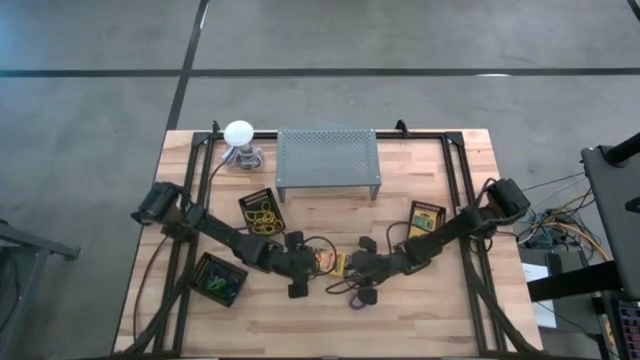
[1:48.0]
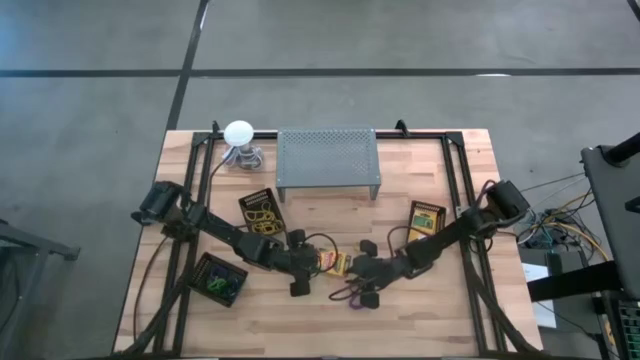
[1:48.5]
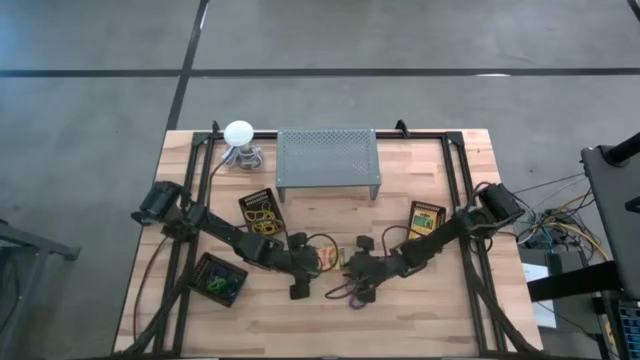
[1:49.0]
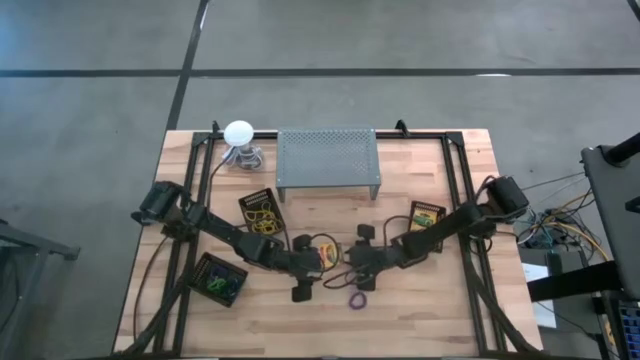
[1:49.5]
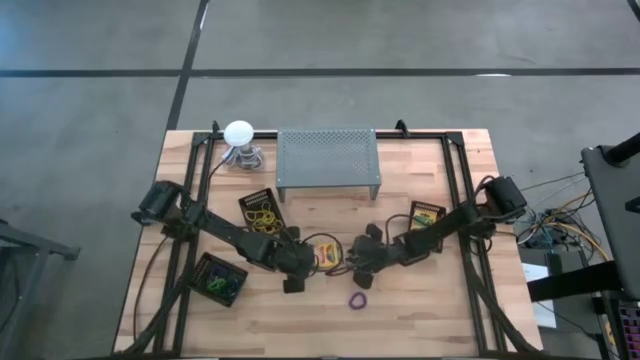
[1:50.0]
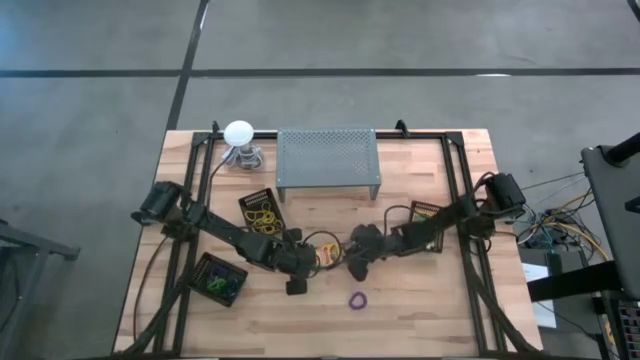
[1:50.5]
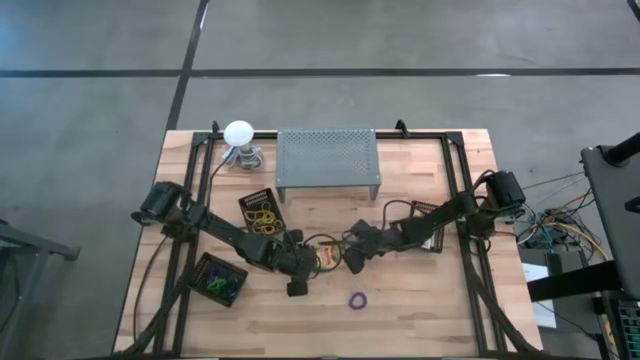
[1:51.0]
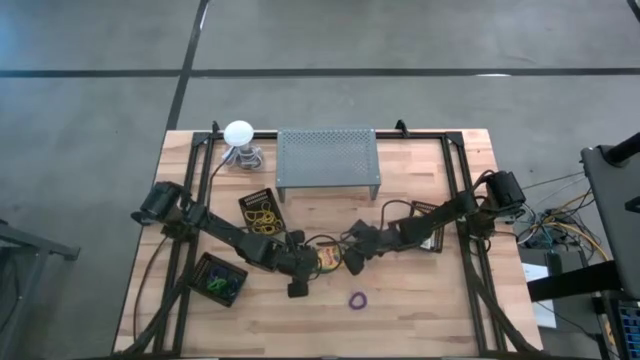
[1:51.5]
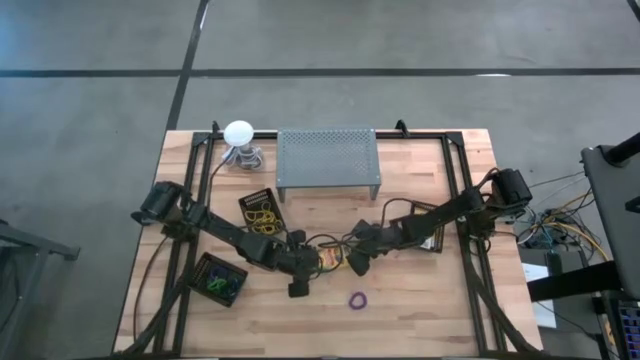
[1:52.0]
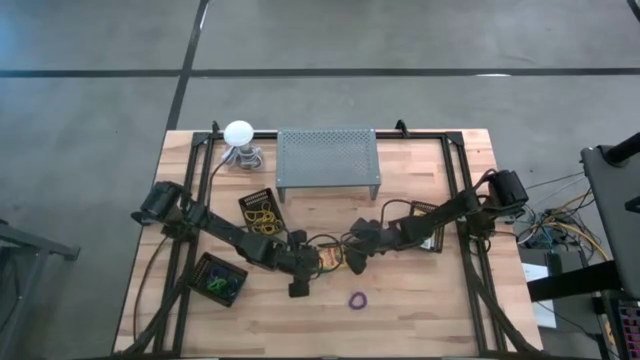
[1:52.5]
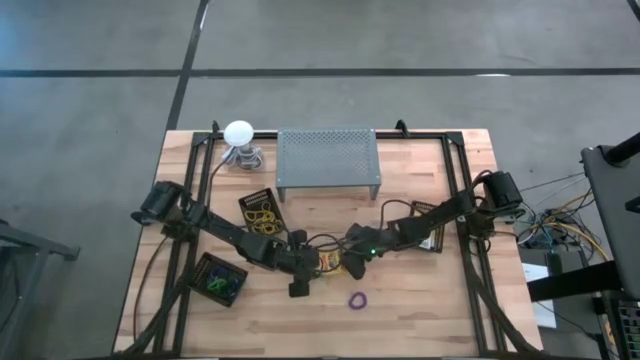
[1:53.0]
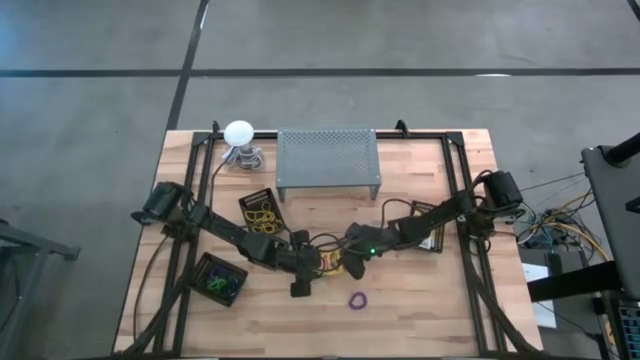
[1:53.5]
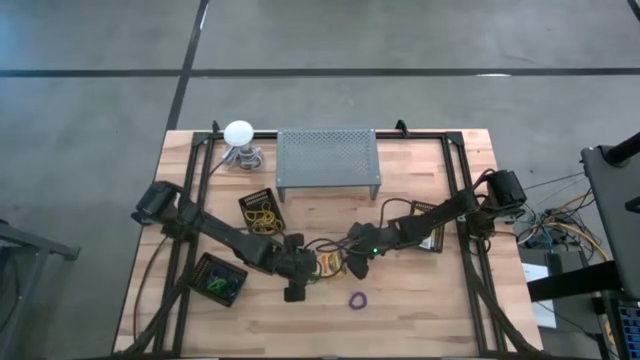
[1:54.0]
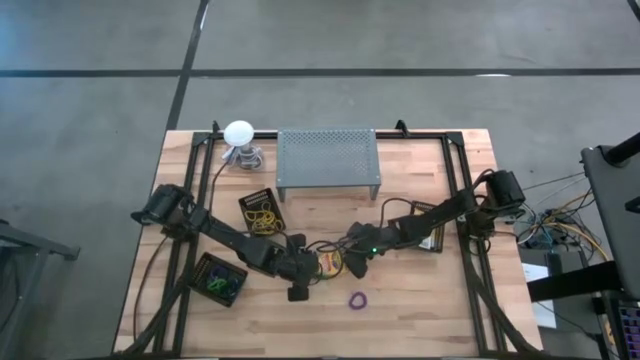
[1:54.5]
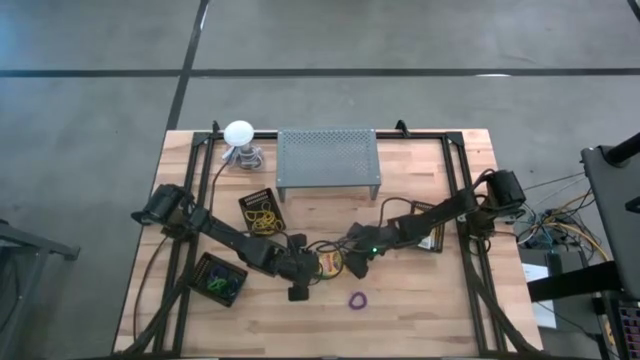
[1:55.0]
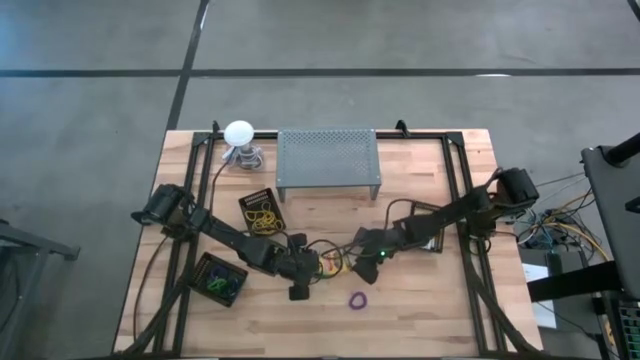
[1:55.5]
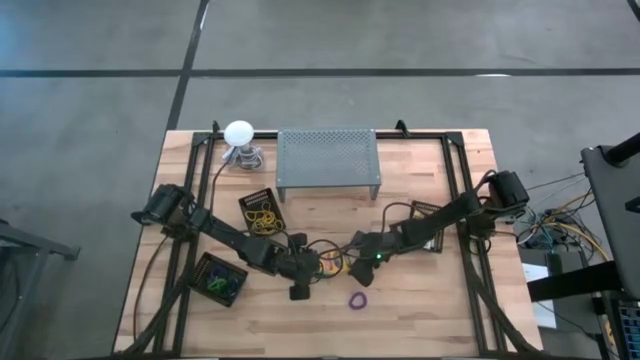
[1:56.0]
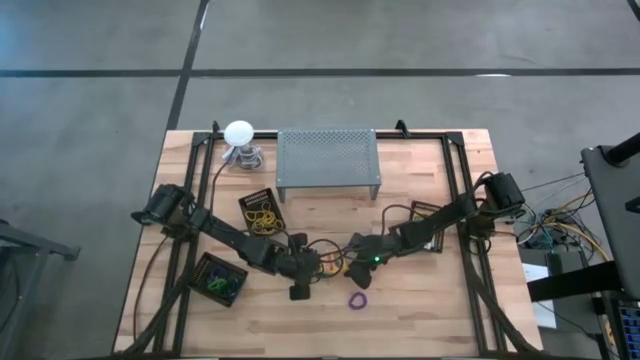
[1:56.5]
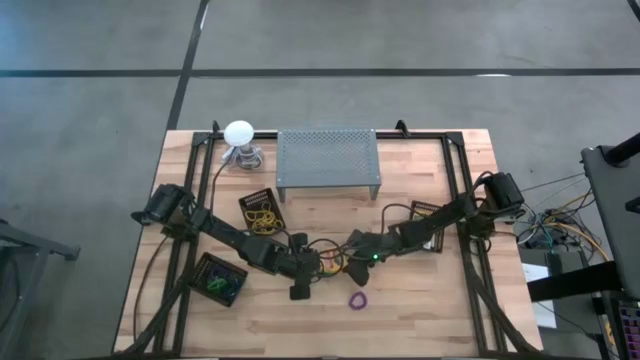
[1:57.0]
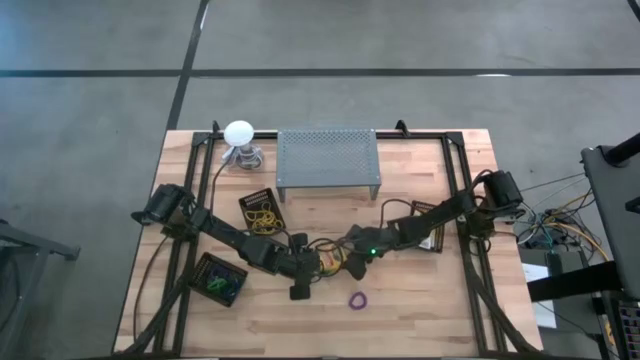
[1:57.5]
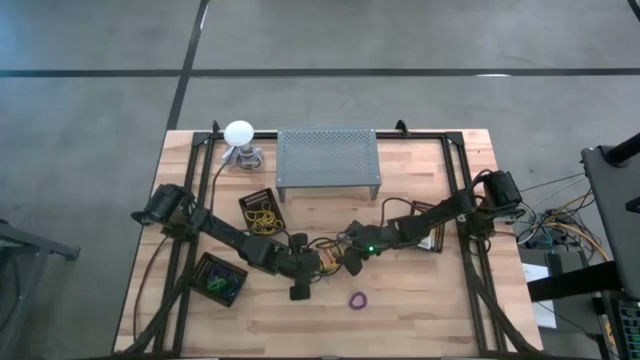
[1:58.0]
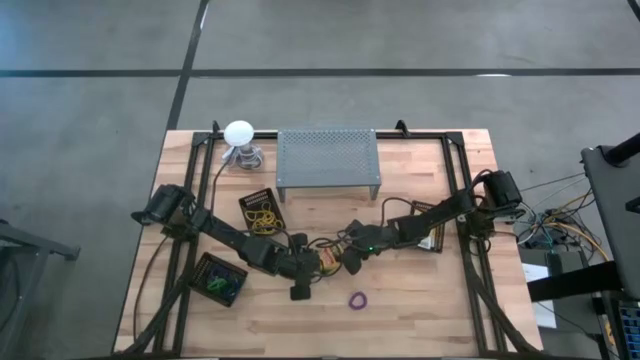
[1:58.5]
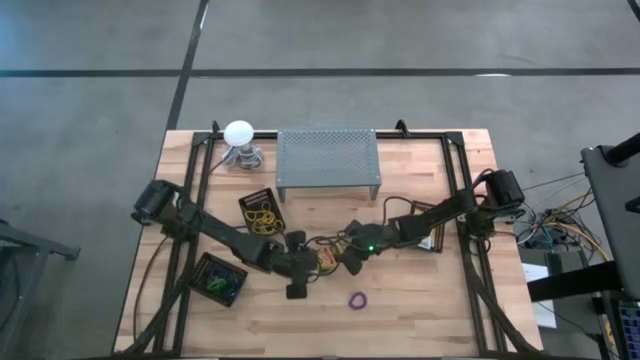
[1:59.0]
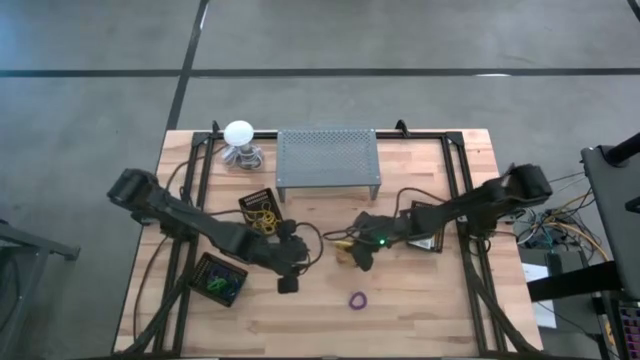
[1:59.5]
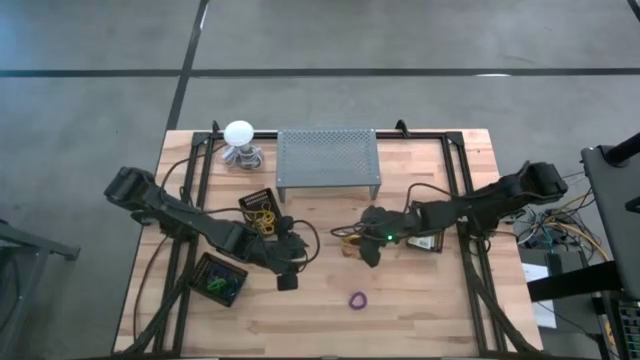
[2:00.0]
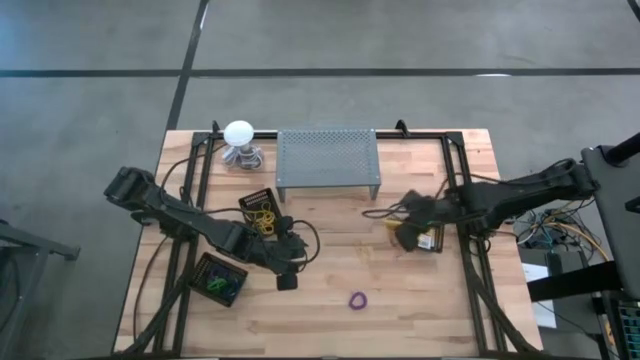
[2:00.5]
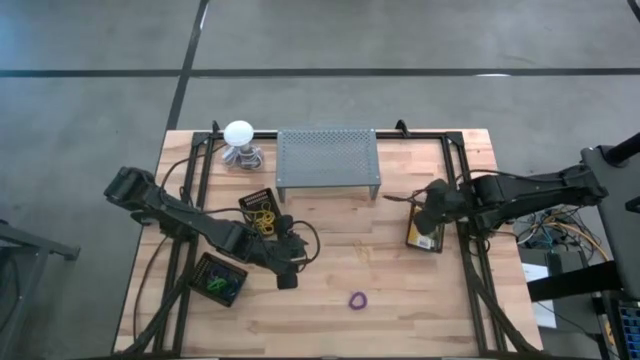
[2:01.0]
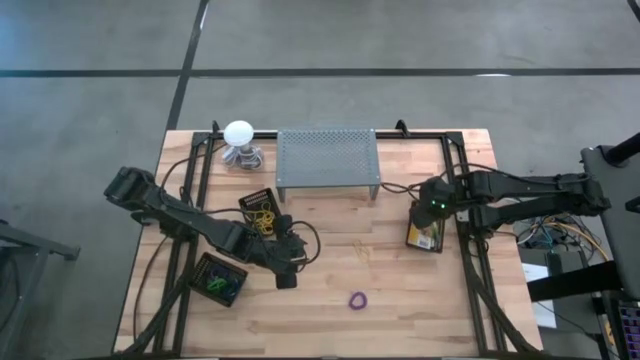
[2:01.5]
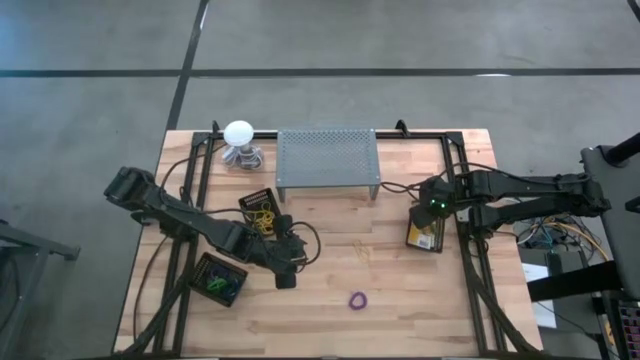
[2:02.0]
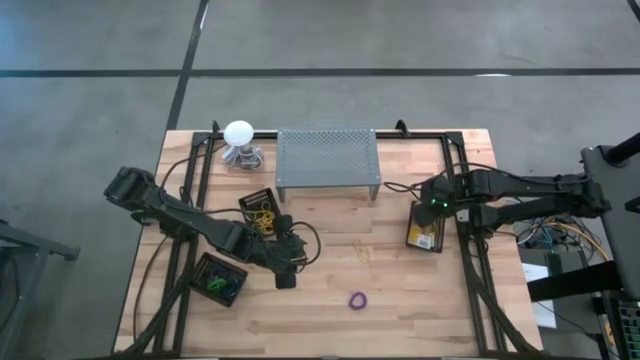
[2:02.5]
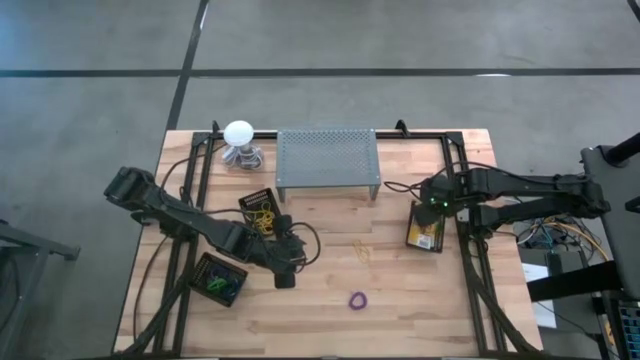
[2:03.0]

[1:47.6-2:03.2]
Task: Pick & Place Office Desk Supplies
Put the crayon box into the top right black bin

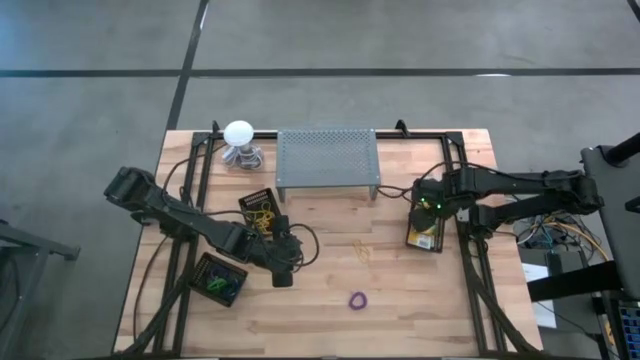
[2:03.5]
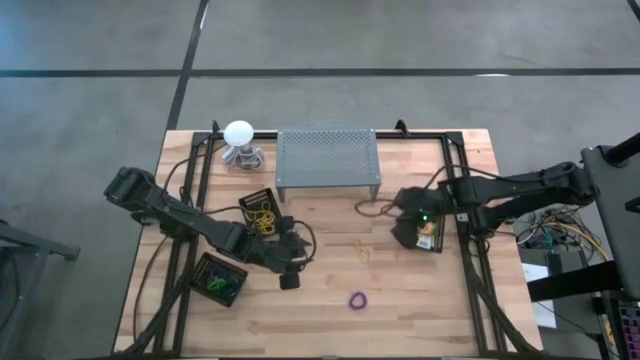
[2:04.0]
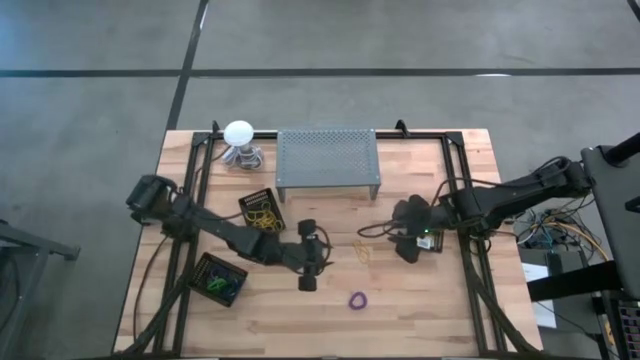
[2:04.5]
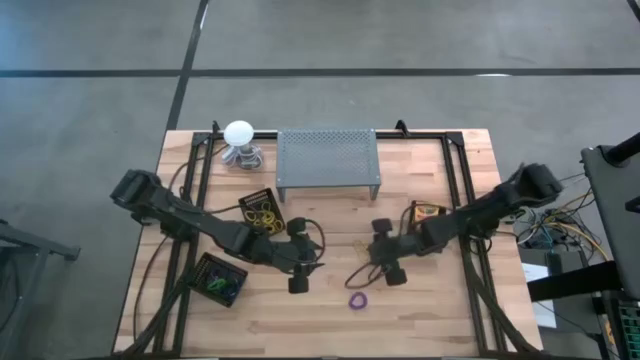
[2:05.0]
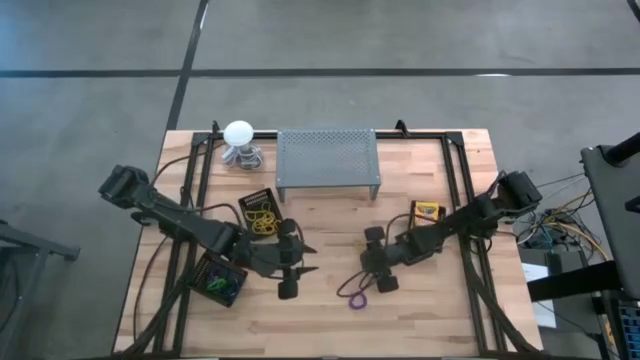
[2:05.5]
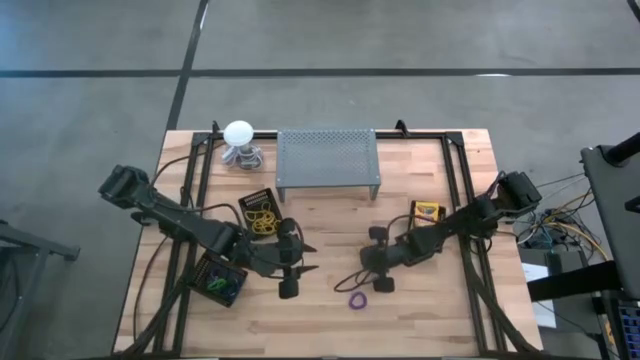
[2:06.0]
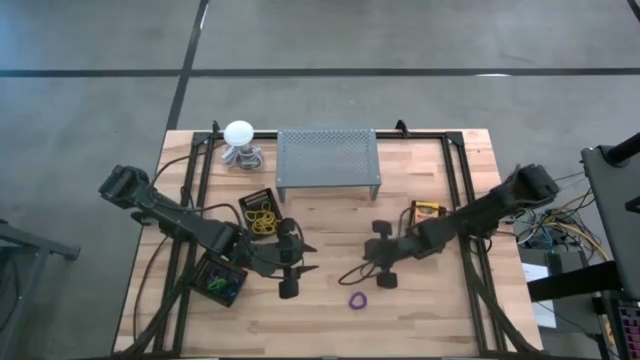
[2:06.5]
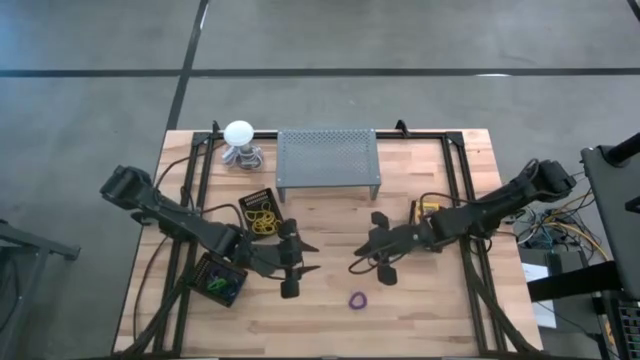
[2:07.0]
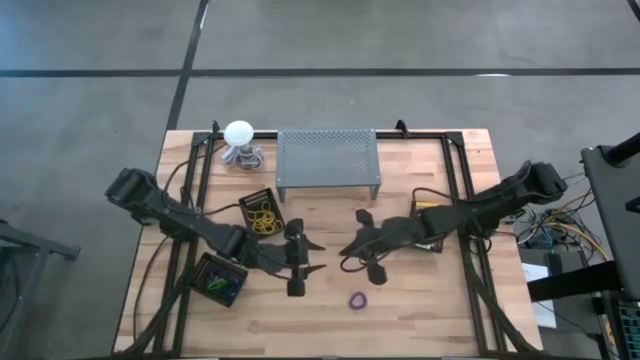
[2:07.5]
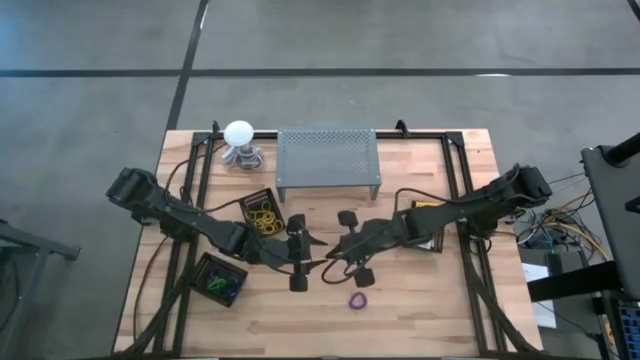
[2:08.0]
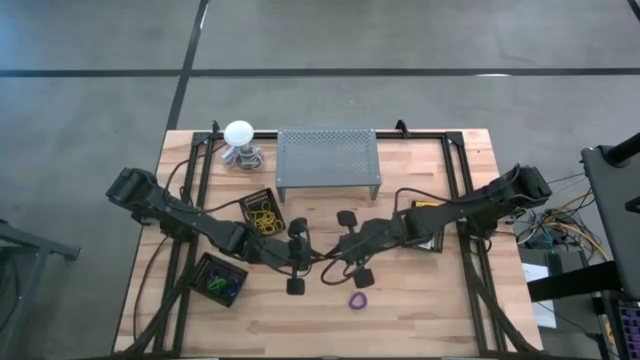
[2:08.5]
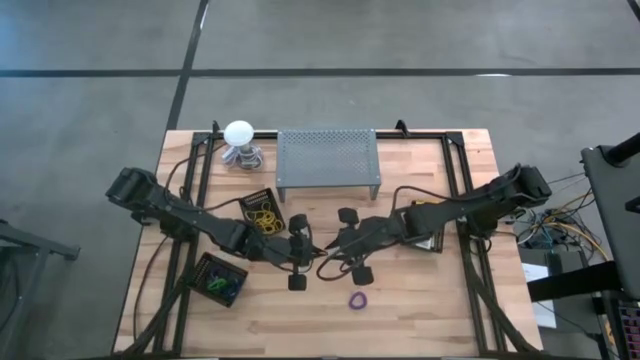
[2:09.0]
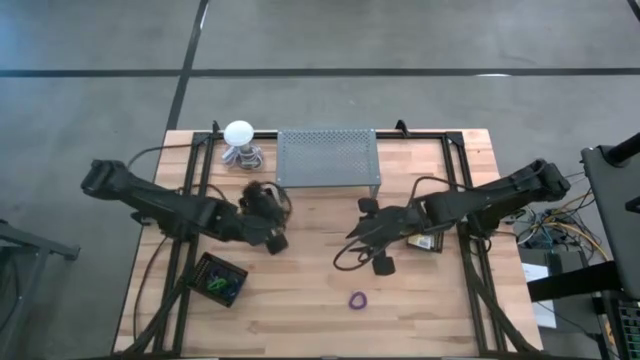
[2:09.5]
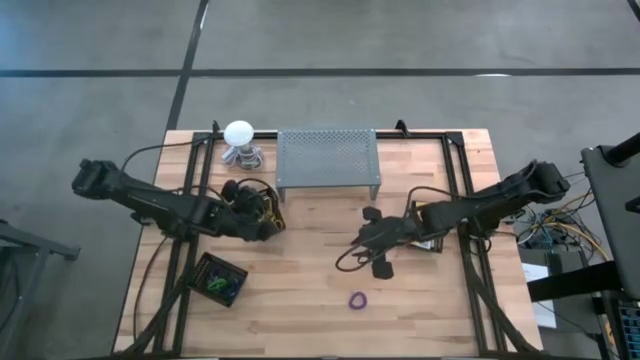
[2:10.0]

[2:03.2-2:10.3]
Put the yellow rubber band into the top left black bin
